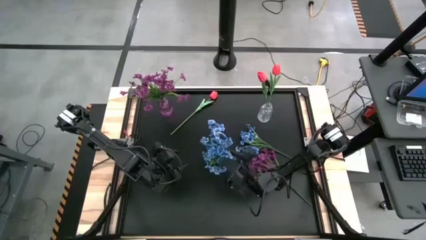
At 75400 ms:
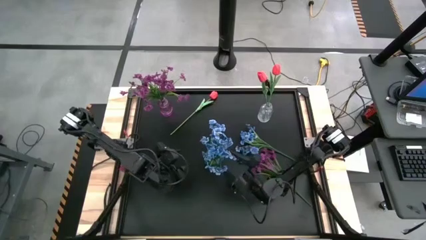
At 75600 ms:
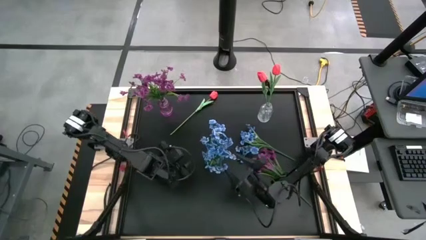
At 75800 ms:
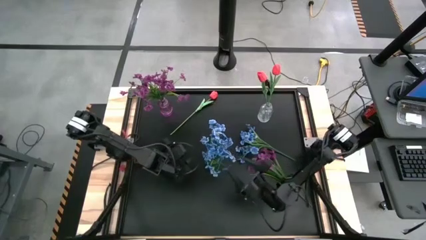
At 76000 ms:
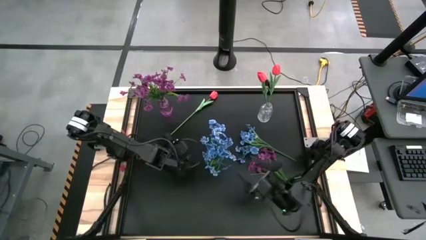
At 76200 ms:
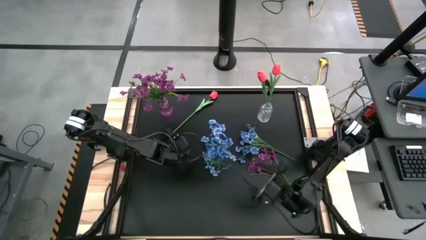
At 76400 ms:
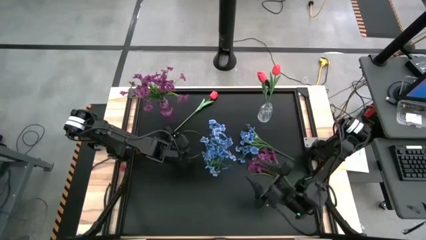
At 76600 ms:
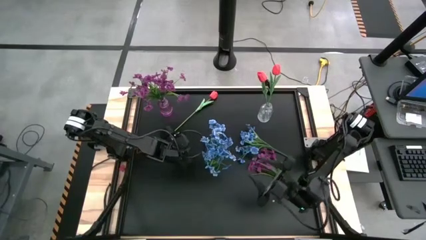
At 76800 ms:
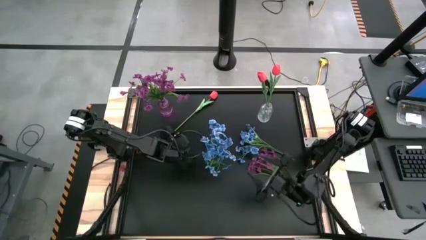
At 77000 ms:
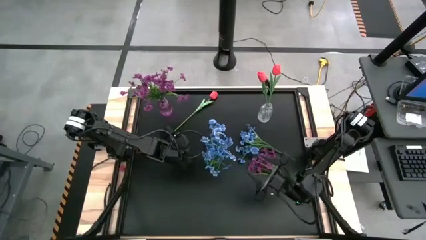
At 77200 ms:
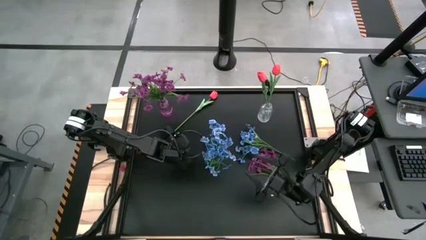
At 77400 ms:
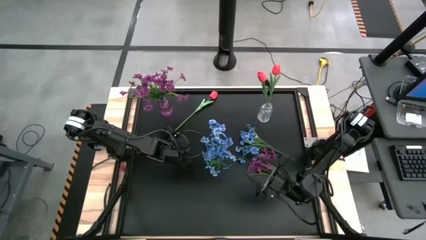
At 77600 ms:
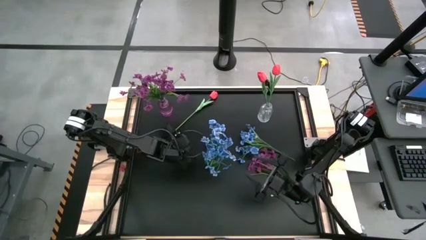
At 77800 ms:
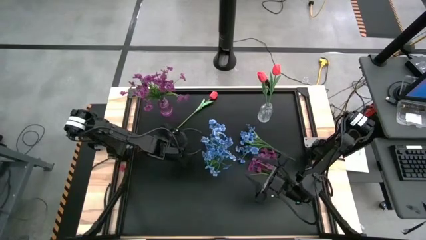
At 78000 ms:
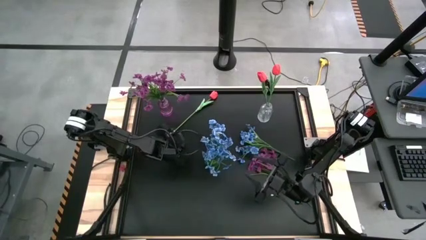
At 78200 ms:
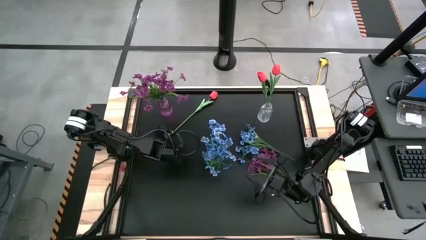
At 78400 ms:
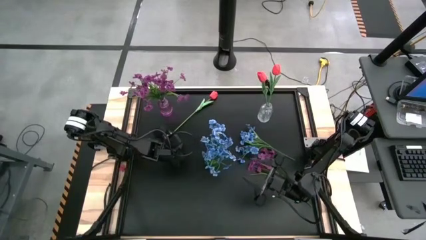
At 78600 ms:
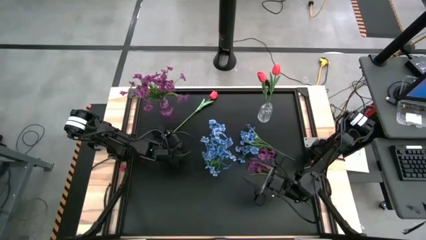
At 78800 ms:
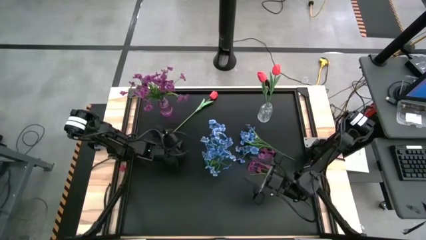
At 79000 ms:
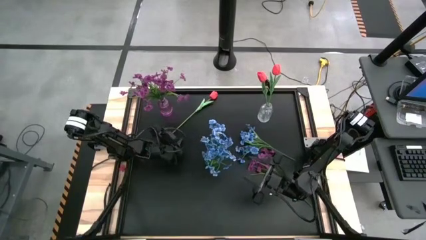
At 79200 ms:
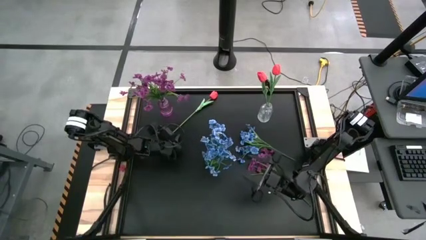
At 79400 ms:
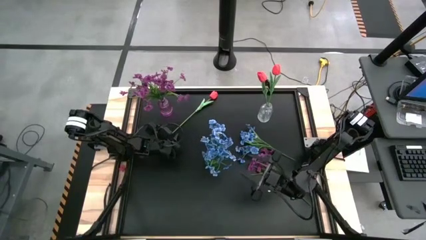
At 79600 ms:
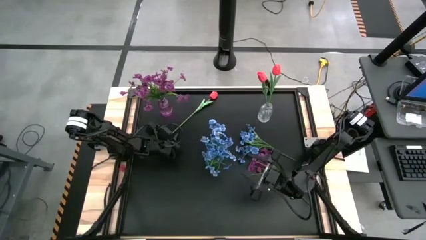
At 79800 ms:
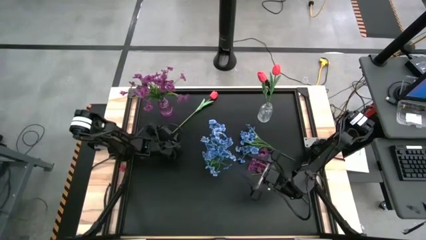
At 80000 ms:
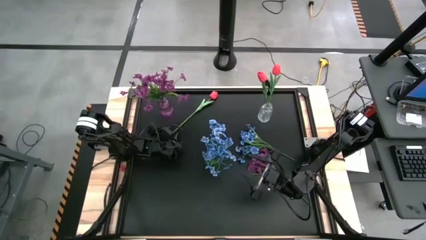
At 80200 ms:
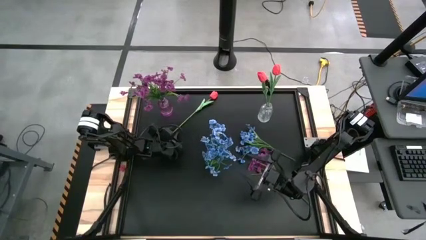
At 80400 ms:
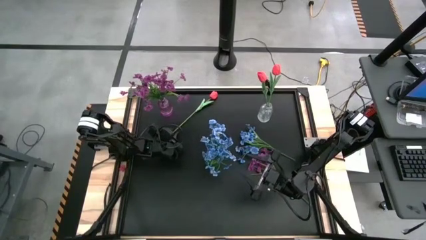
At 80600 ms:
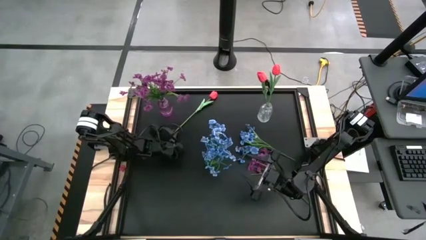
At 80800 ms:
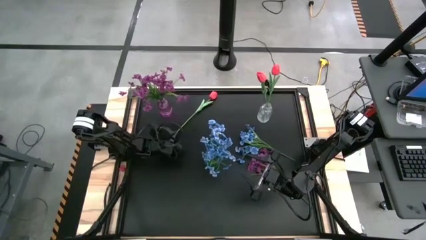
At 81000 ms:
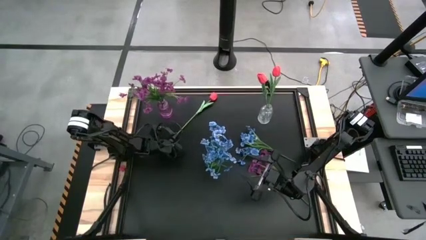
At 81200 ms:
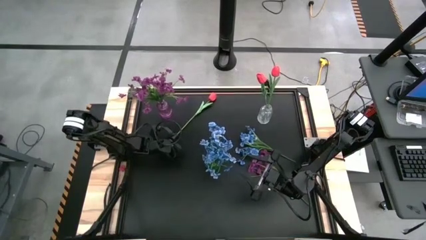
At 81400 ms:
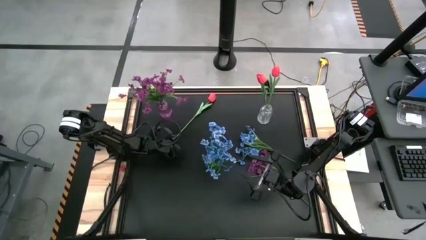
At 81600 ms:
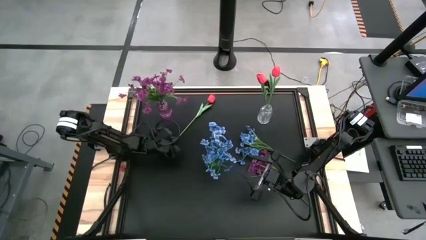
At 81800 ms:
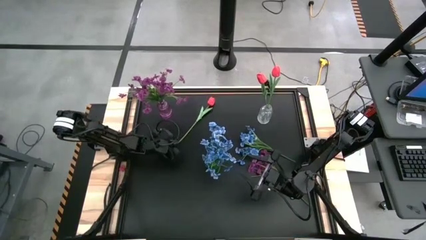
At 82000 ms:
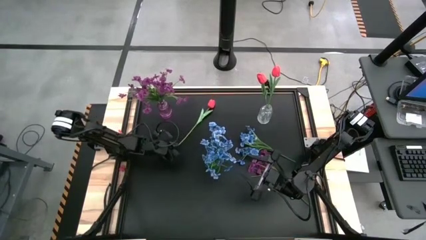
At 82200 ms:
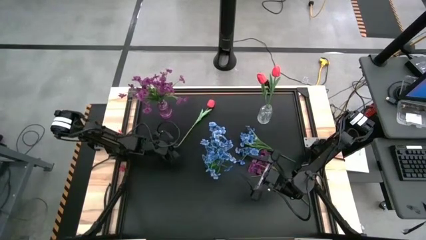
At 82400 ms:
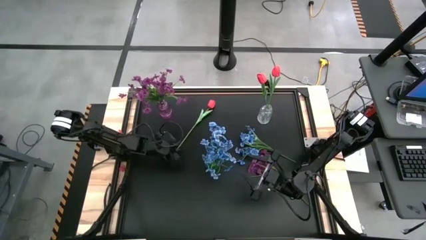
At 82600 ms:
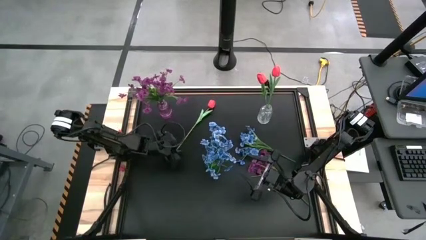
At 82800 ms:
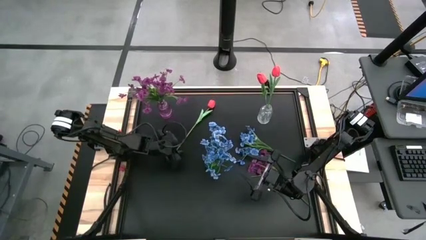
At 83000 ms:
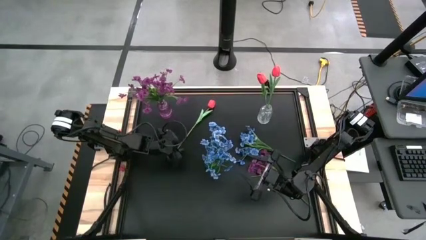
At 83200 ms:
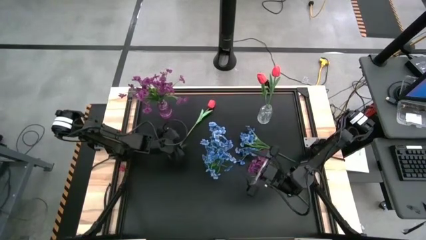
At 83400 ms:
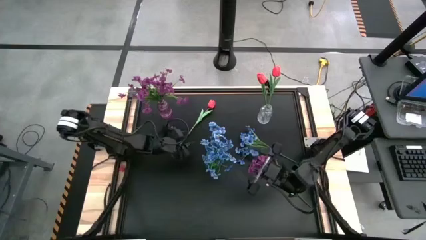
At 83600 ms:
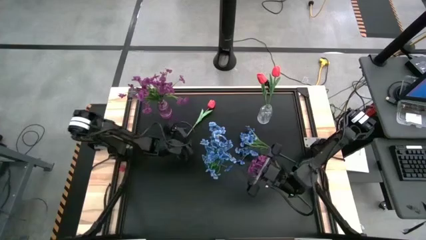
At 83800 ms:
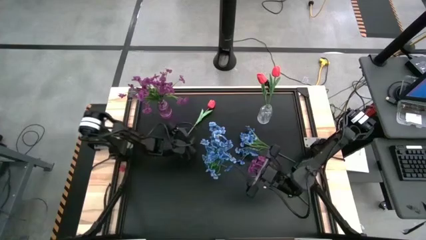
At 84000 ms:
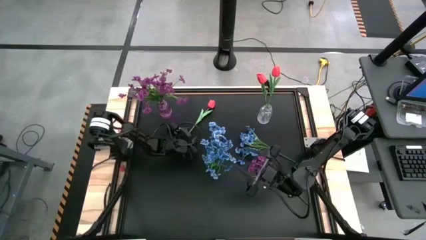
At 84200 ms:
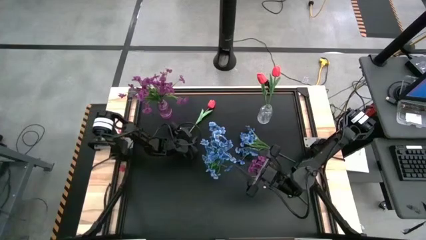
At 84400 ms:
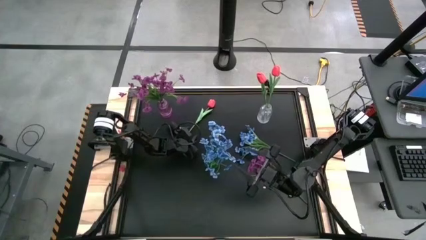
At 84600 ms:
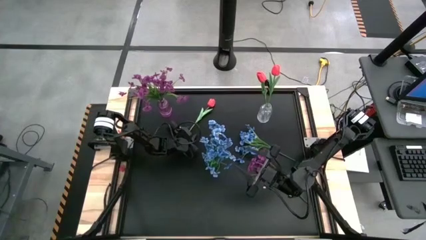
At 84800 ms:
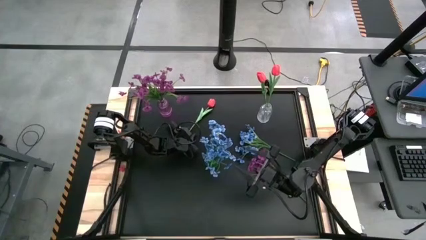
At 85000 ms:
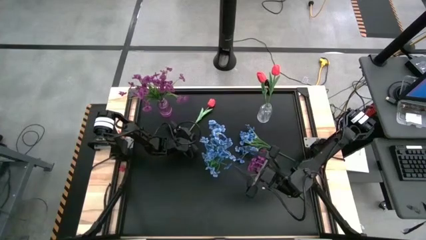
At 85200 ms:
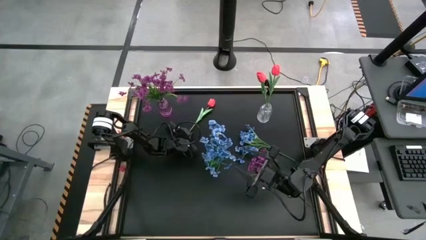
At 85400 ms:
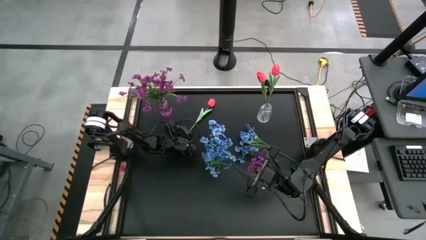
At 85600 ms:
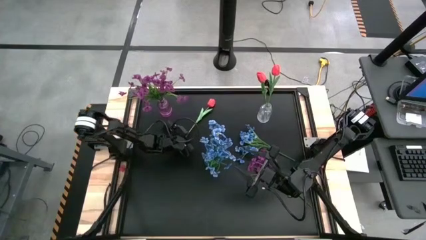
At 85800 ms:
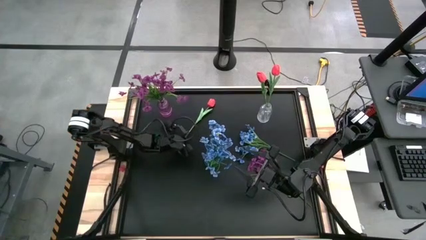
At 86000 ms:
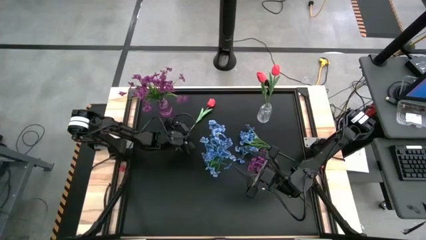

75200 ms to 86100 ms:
Task: Sort flowers into vase by color
Put the red flower into the transparent crystal vase

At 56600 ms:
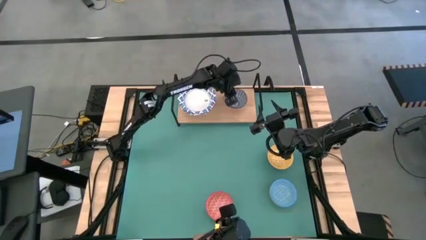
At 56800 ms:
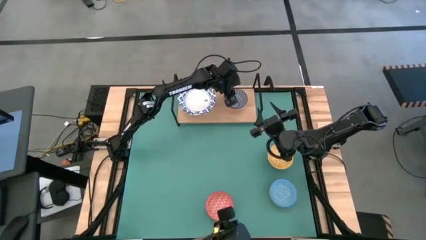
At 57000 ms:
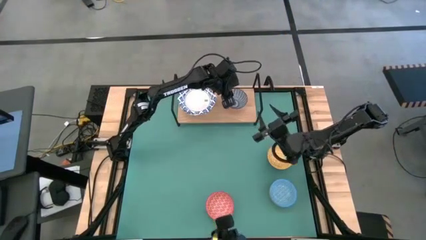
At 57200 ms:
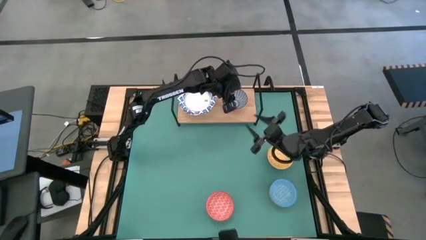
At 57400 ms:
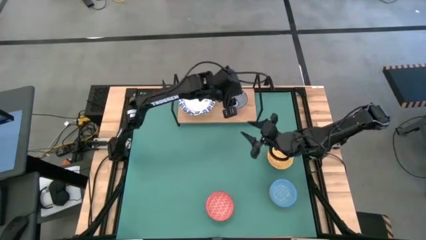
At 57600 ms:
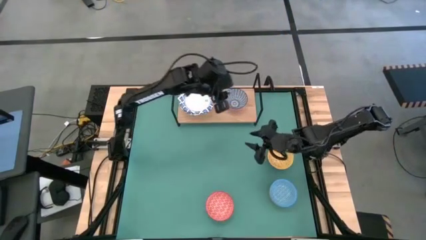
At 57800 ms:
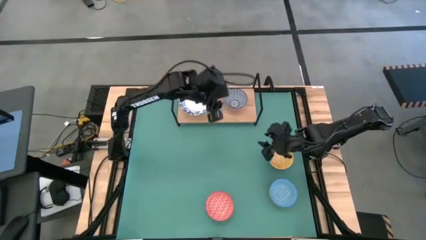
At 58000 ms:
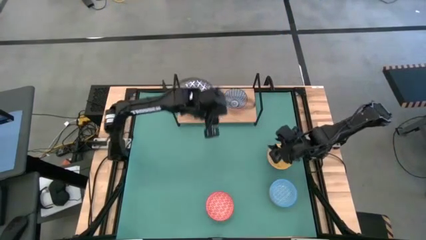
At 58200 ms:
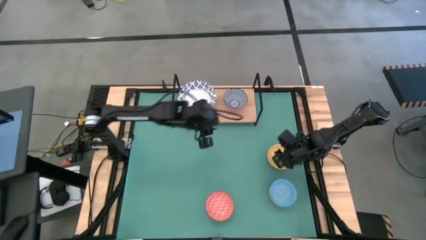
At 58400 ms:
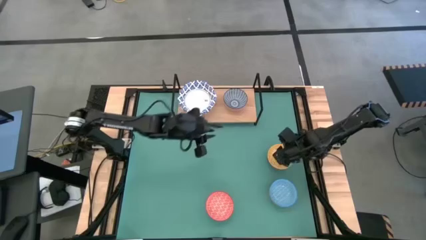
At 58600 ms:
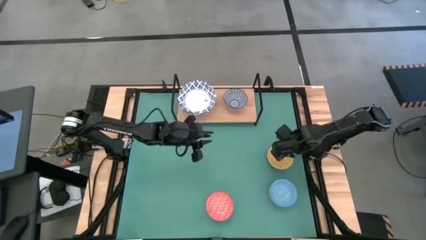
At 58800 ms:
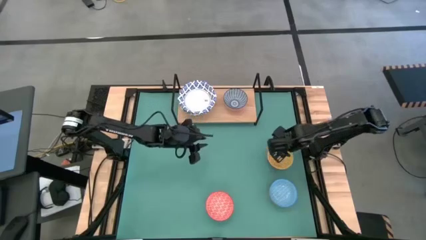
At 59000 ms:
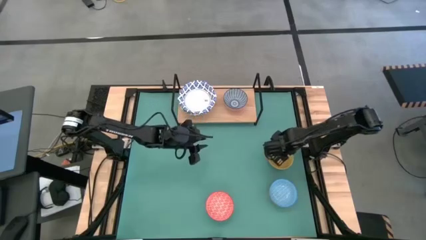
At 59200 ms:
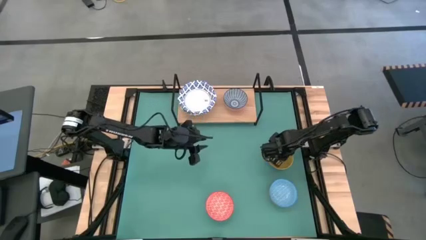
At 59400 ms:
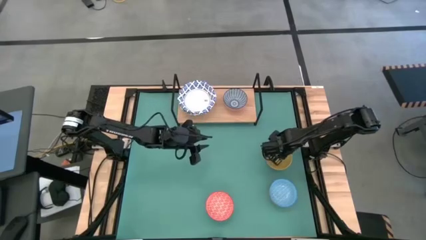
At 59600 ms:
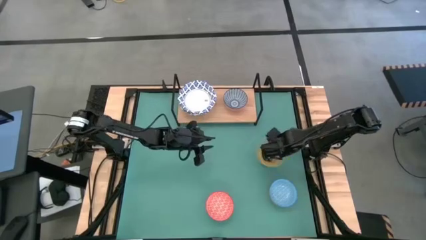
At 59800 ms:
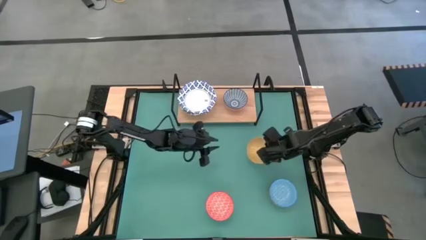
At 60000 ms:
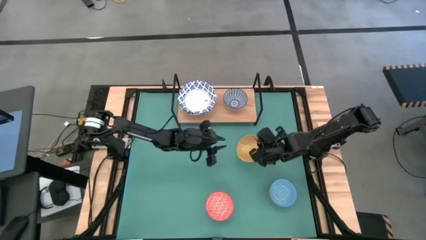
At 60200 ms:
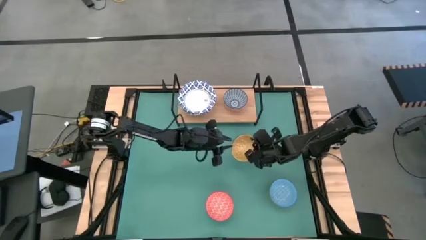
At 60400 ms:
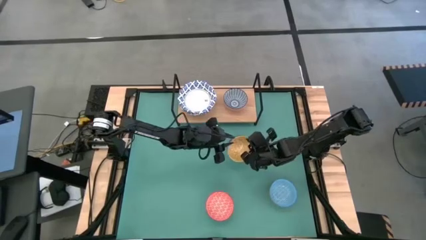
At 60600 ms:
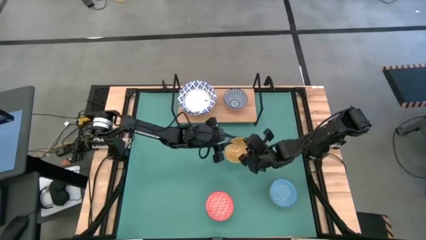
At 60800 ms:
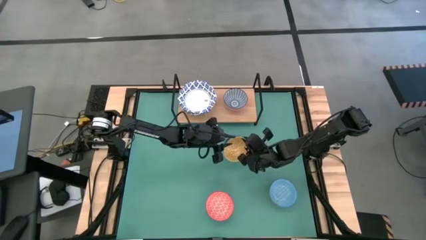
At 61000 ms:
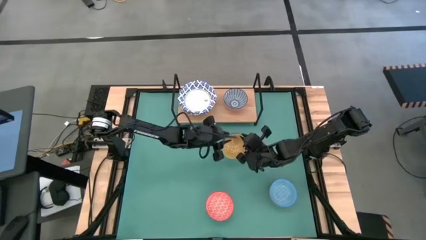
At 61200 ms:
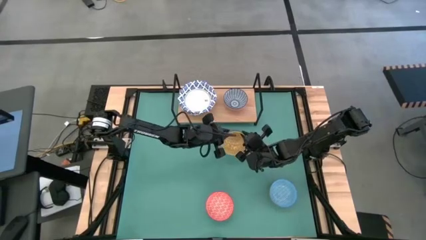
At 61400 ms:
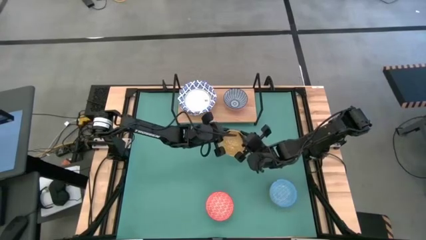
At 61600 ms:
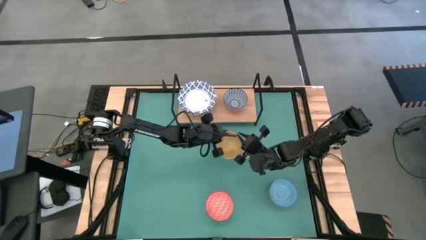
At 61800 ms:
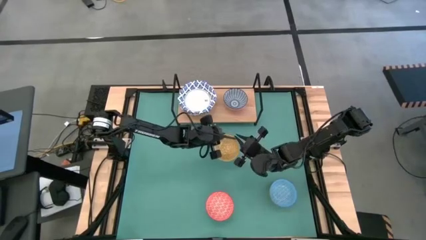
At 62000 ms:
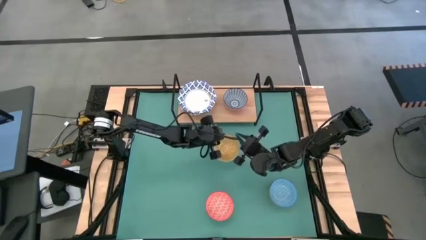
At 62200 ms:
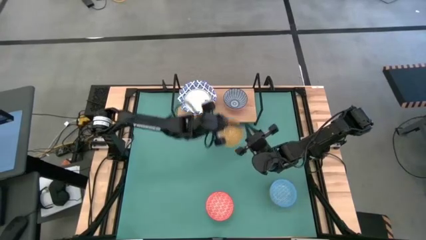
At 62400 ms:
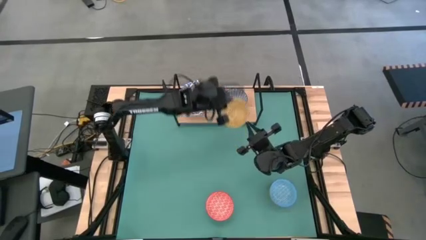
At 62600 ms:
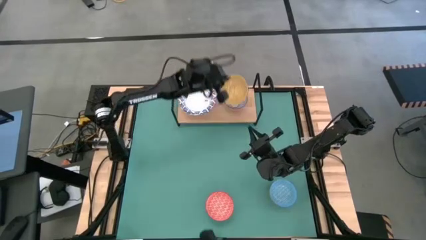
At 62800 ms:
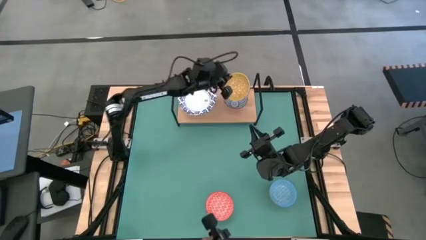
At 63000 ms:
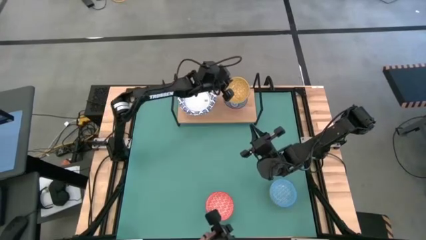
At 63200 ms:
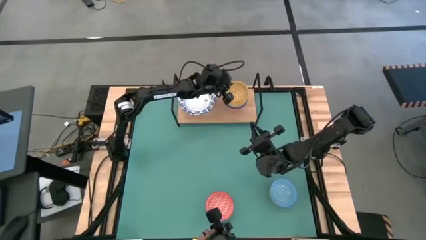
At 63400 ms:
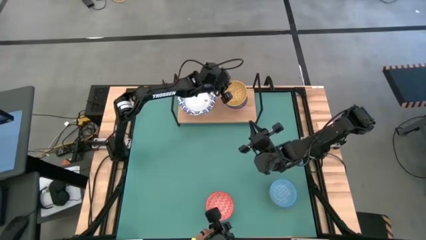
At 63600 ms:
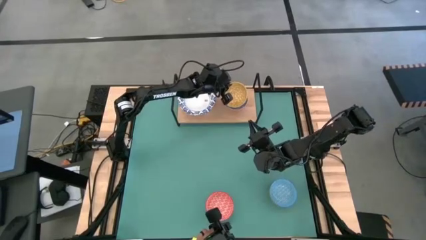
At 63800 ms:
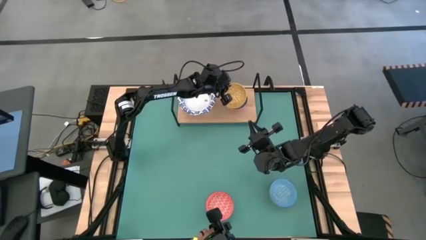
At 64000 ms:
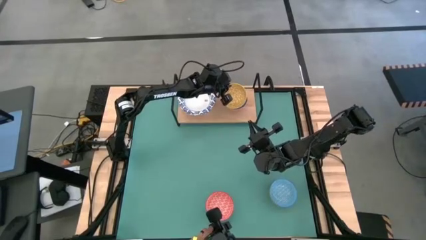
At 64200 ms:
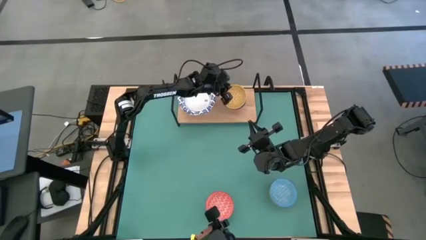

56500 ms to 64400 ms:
Task: Place and stack bowls onto a shelf
Stack the yellow patterned bowl on top of the blue patterned bowl on the shelf
